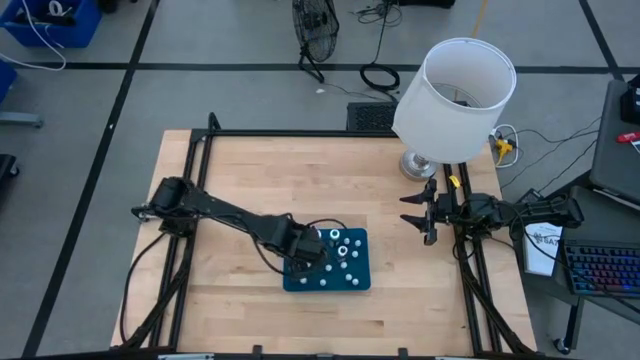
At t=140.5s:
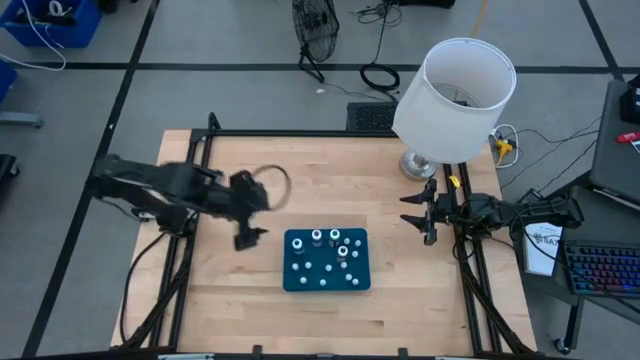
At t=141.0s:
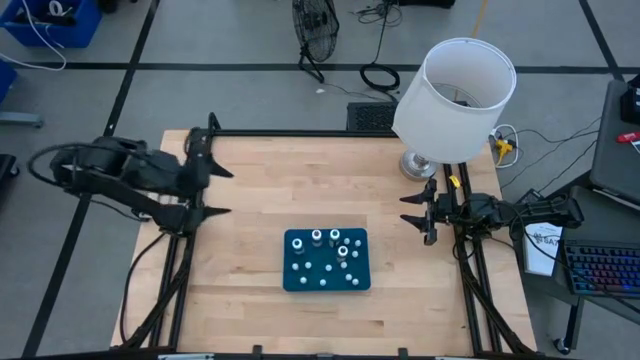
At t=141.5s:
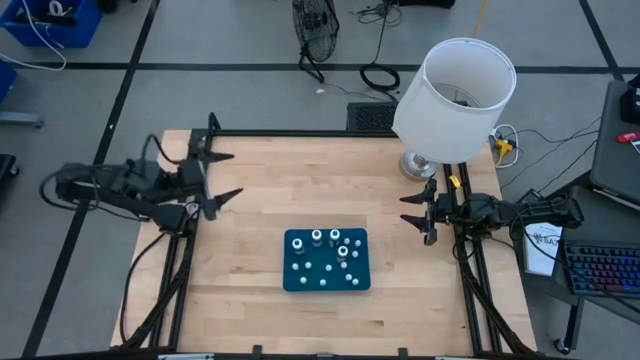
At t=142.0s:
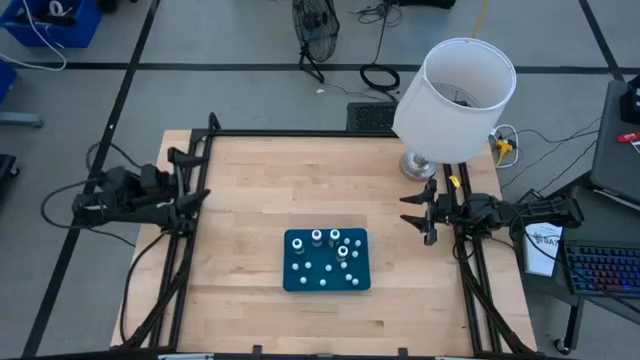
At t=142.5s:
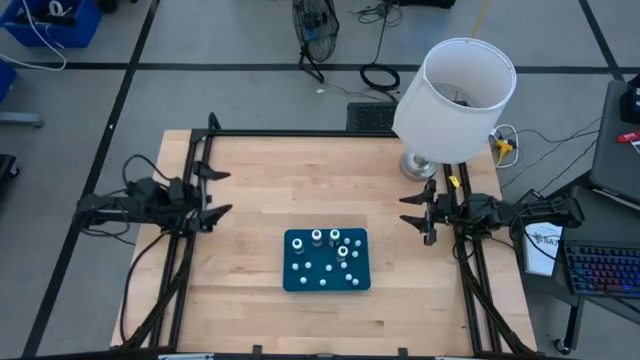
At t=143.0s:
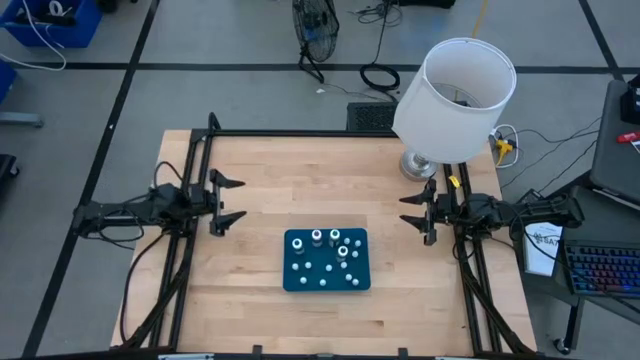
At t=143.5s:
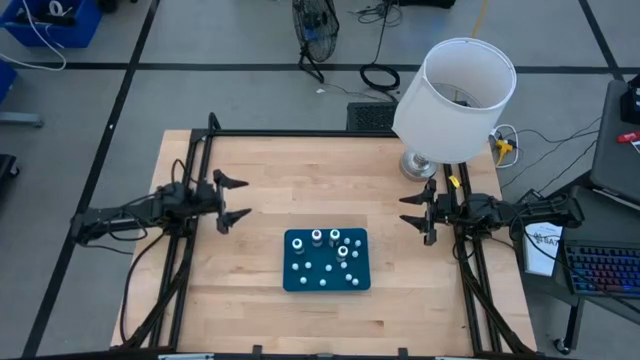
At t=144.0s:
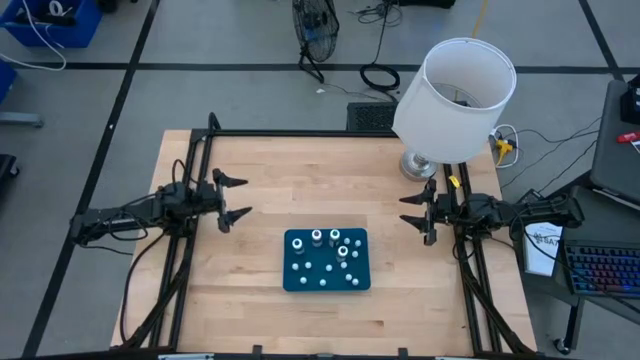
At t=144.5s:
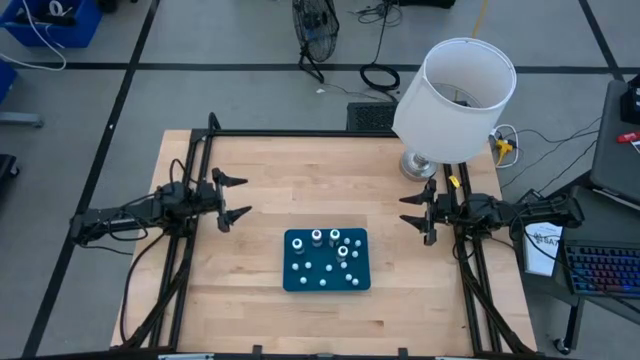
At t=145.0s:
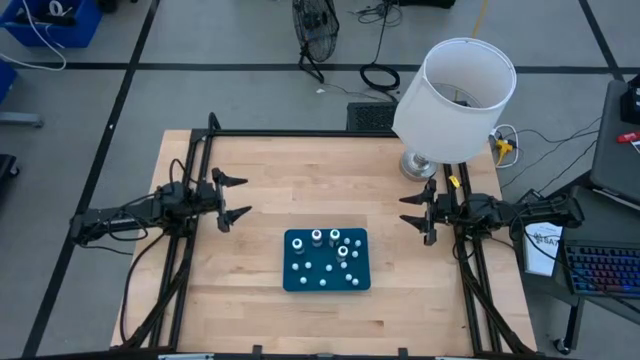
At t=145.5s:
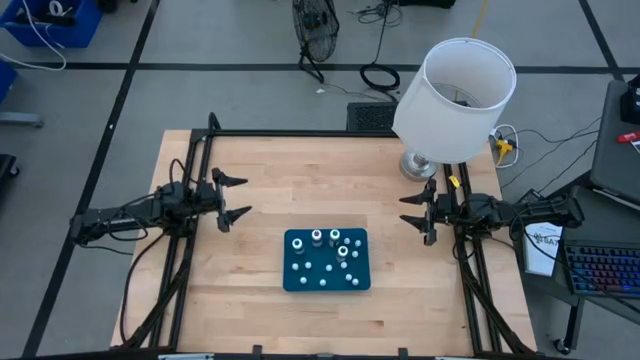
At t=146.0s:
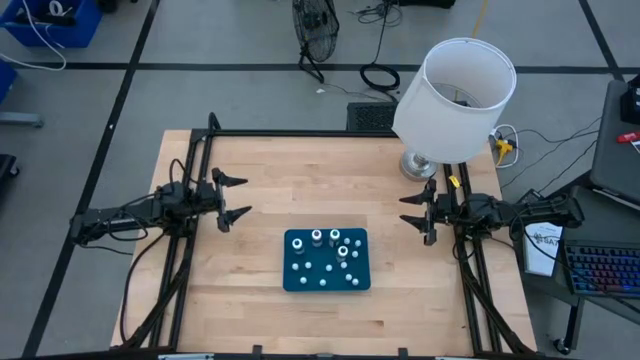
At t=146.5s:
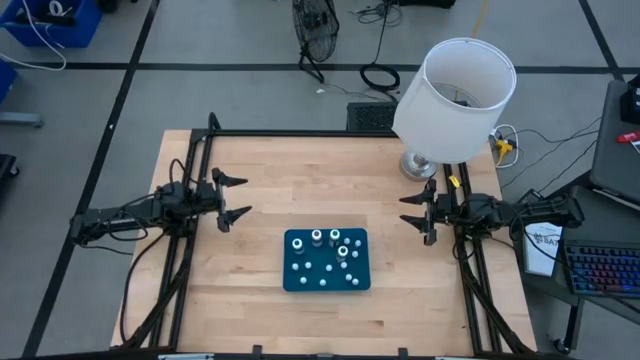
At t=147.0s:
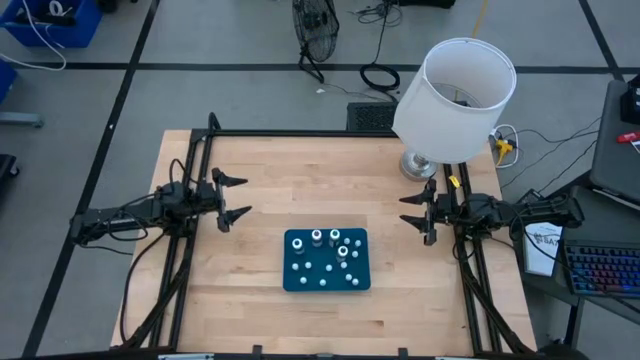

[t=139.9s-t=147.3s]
Task: Pick & Place food coloring
Return to Home Position

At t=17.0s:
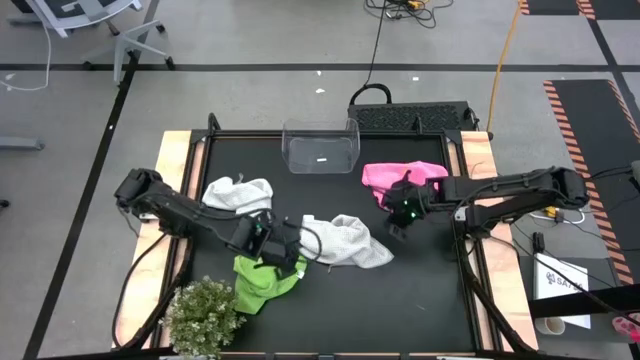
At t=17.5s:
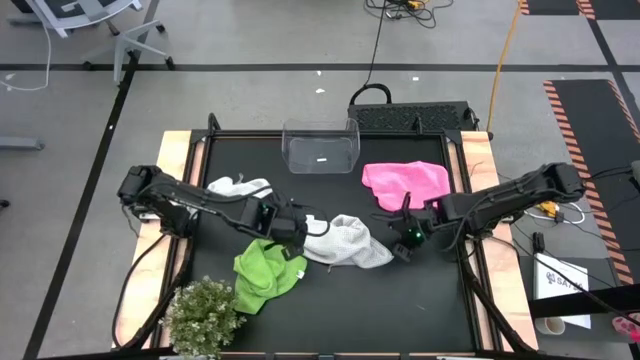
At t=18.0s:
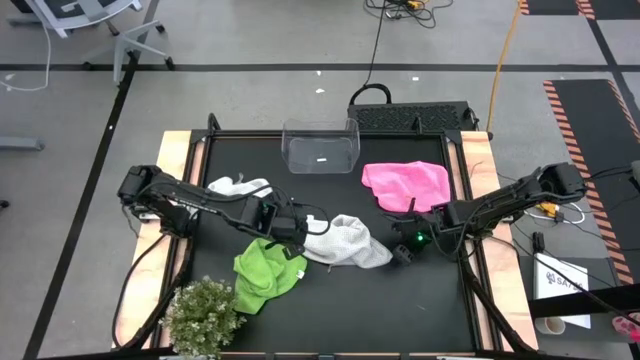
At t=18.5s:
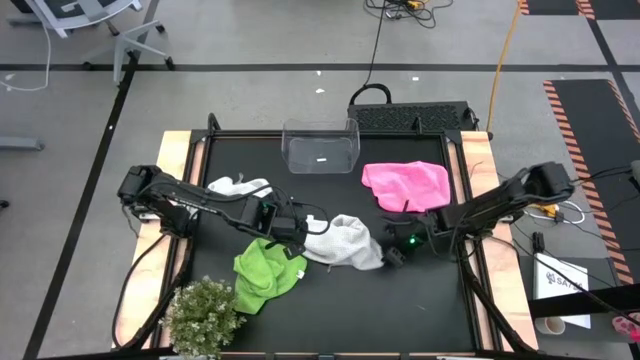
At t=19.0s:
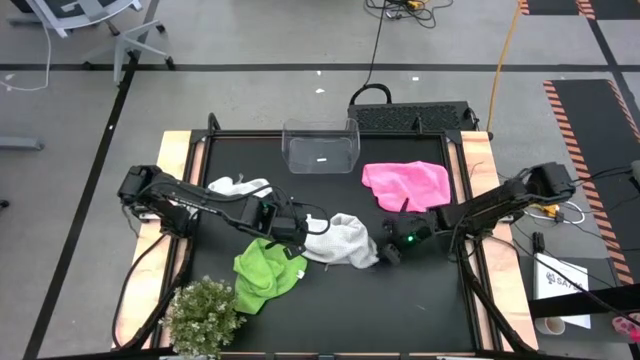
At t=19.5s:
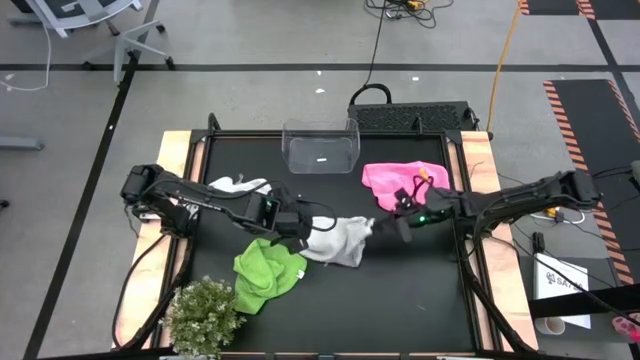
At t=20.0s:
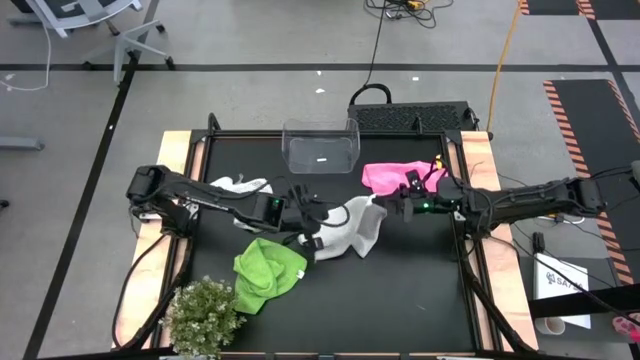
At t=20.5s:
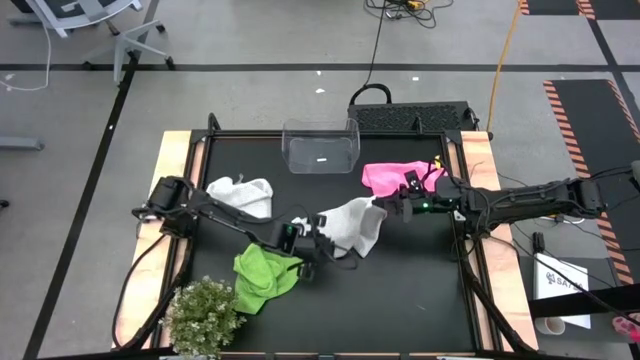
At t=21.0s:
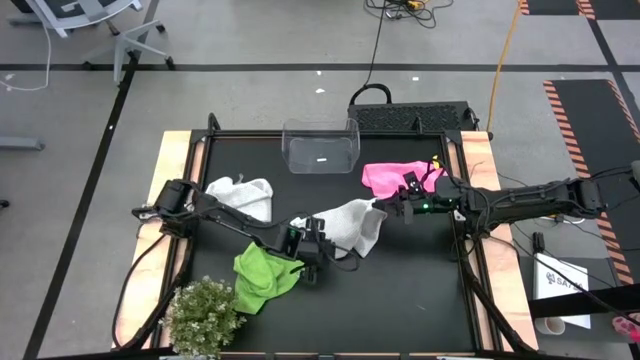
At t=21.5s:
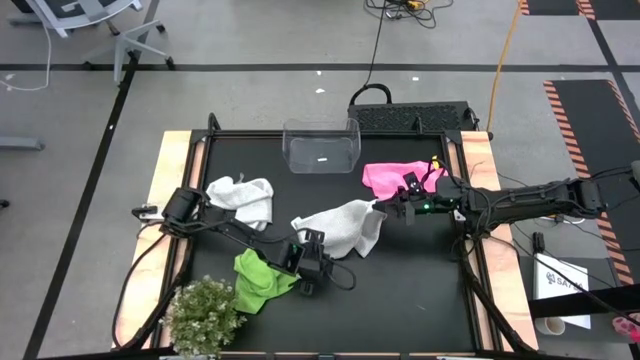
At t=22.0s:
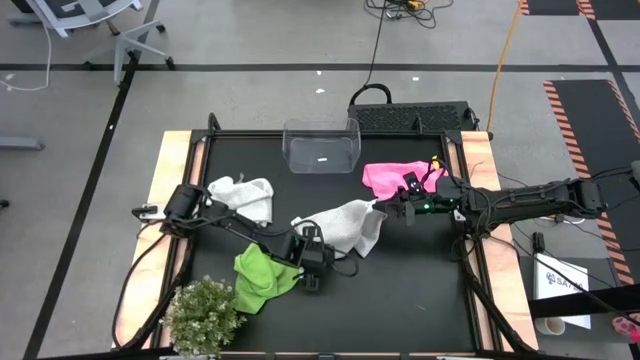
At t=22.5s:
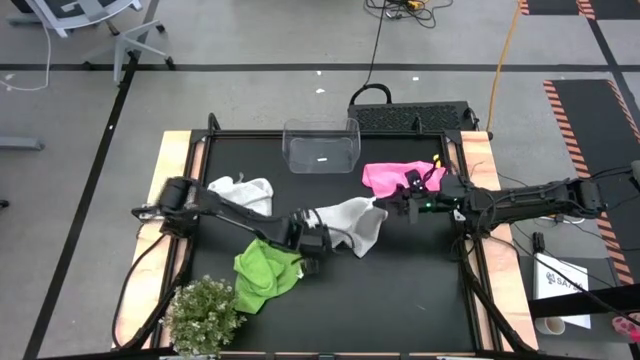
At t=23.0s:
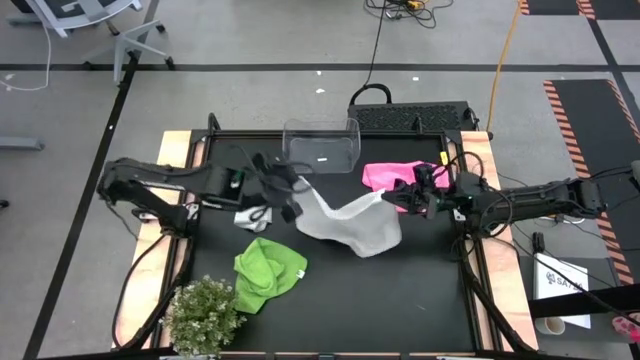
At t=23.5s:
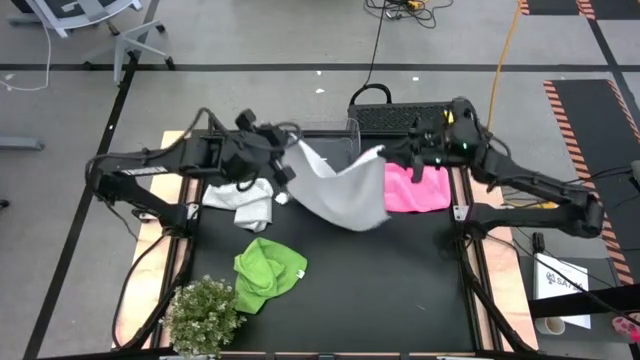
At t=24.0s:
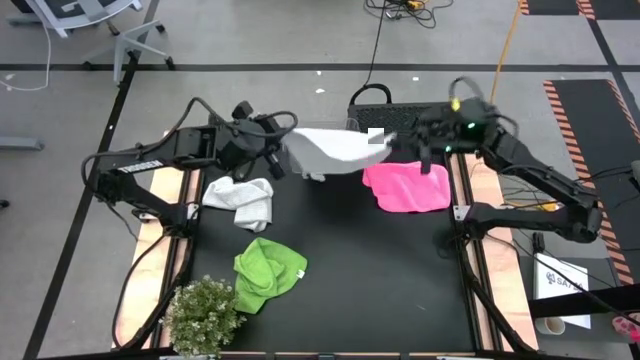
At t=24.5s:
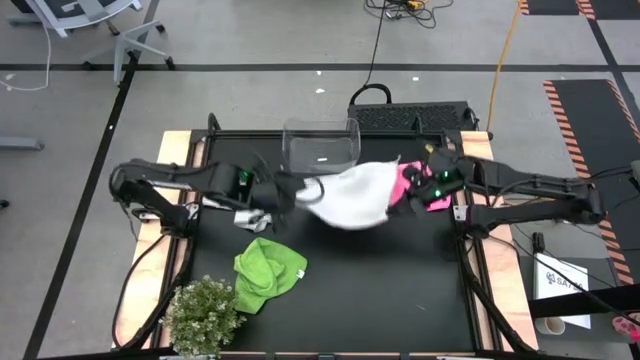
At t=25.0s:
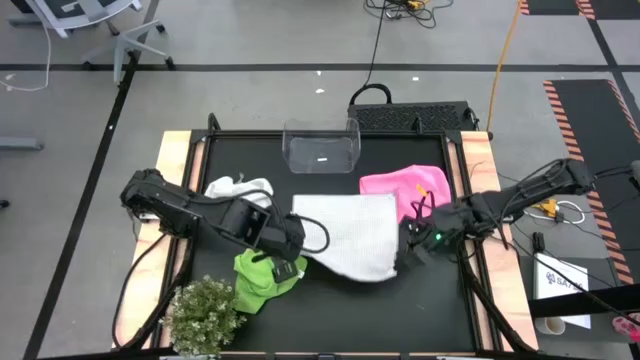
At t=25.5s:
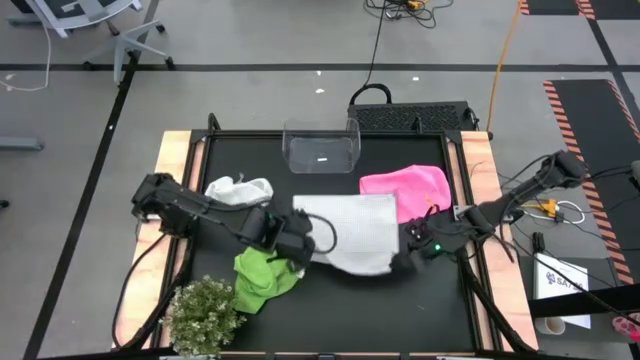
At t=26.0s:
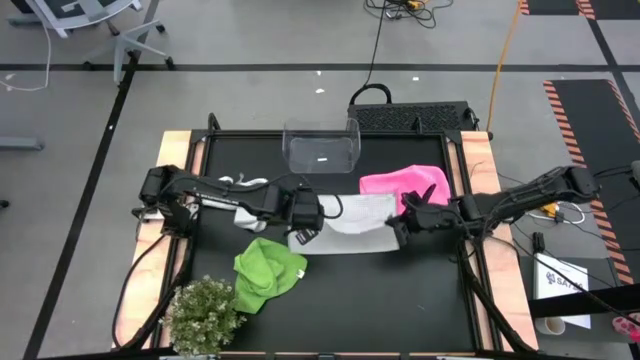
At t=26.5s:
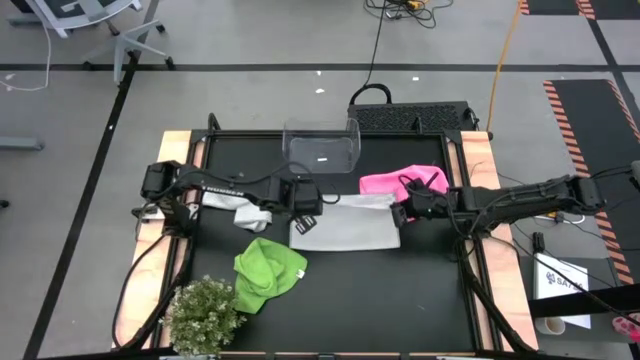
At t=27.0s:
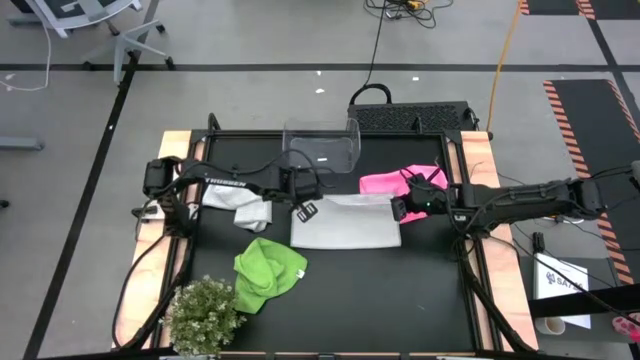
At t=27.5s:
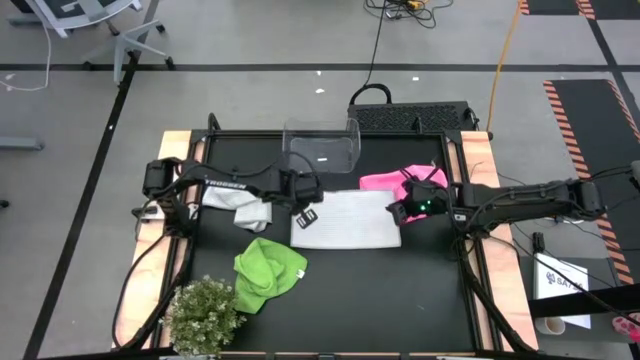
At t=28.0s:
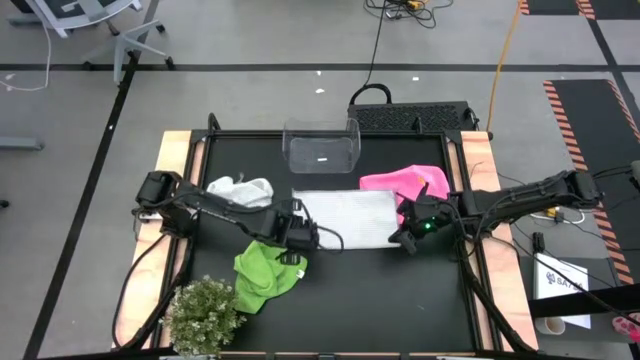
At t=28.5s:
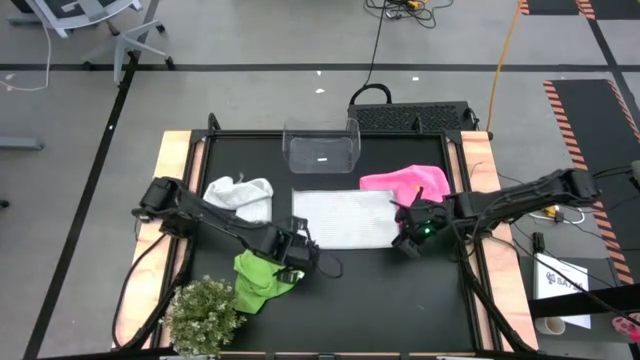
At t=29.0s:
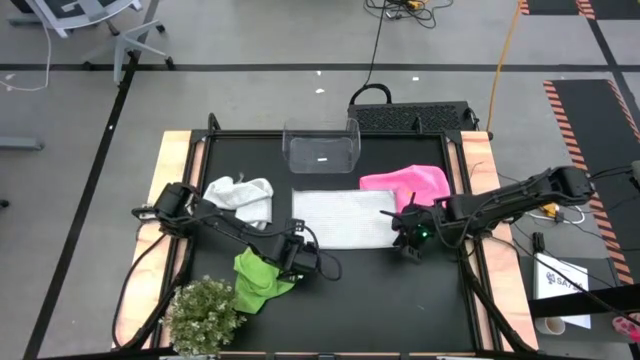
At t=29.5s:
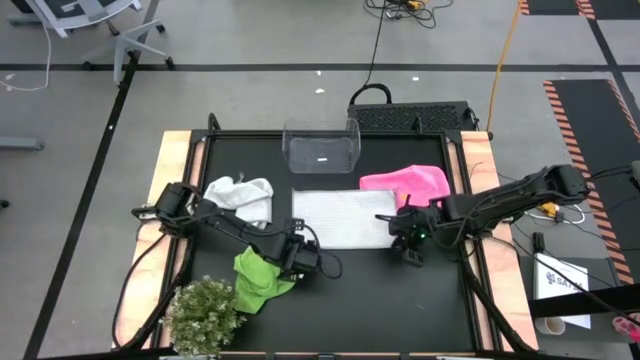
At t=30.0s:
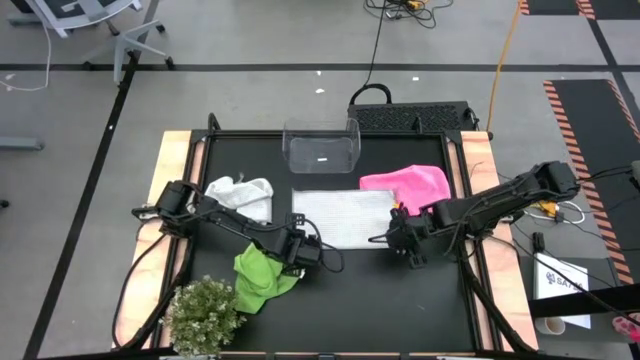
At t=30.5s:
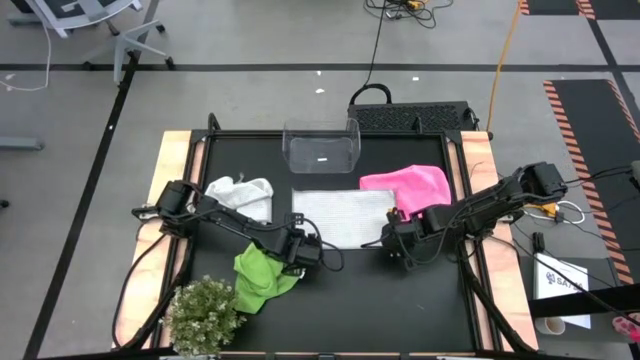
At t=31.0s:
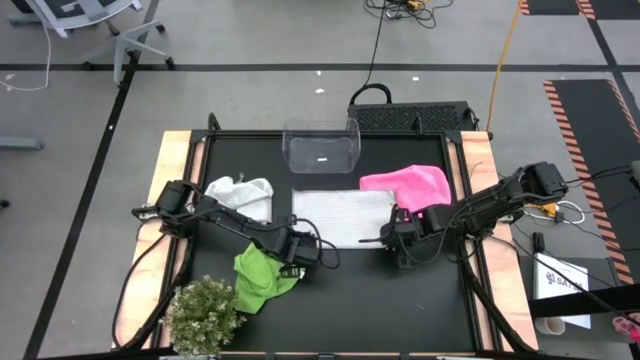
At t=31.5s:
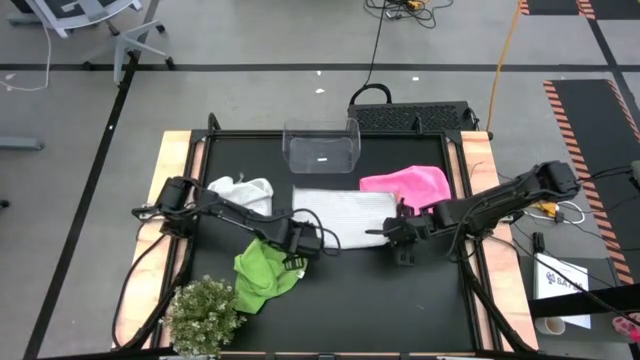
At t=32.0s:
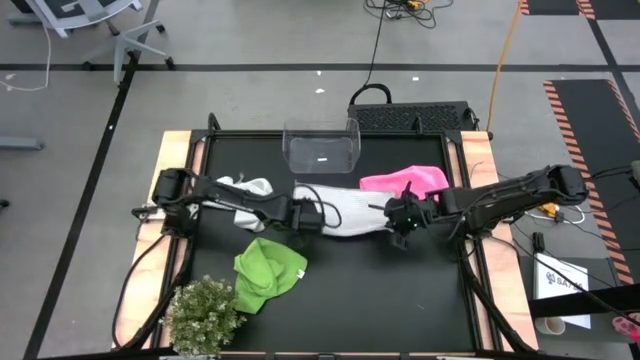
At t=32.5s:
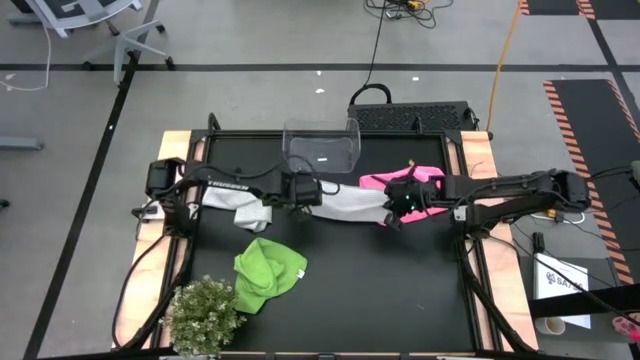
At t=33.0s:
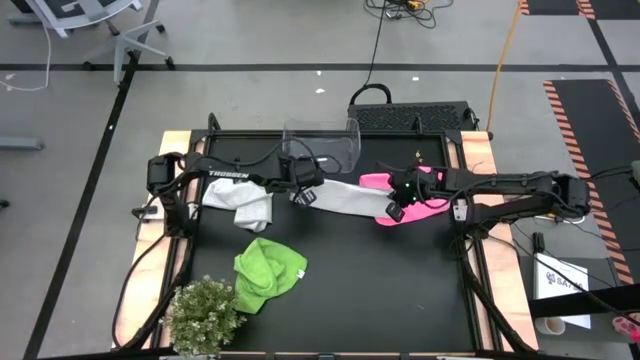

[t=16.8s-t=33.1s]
Task: Fold microfiber towels
Fold the right gray microfiber cloth
